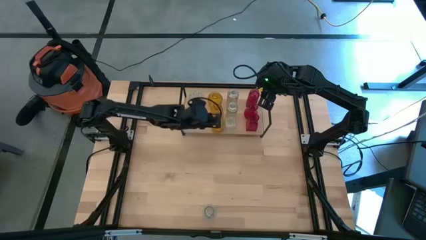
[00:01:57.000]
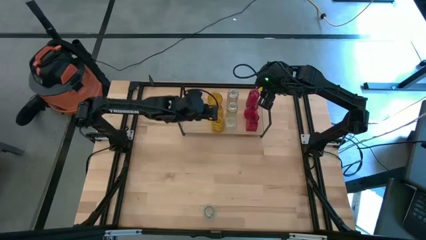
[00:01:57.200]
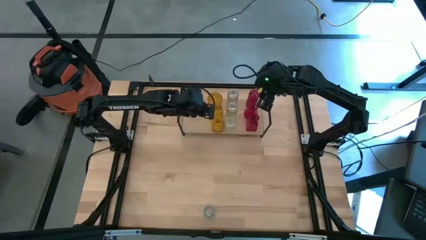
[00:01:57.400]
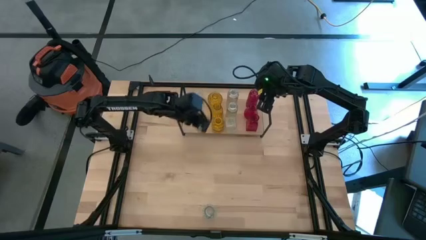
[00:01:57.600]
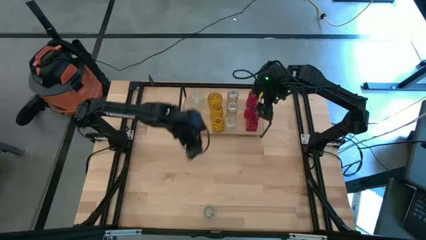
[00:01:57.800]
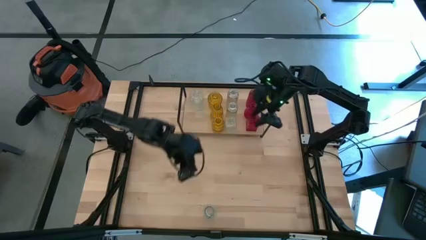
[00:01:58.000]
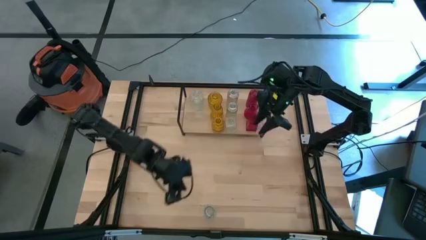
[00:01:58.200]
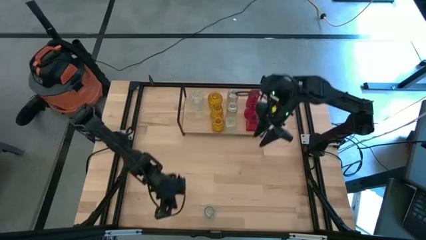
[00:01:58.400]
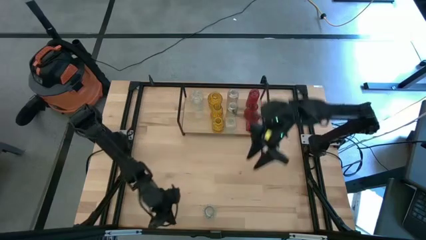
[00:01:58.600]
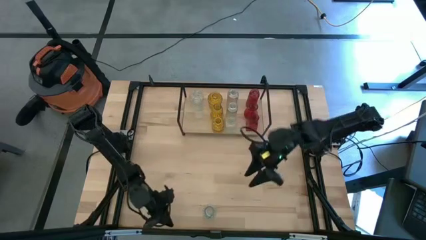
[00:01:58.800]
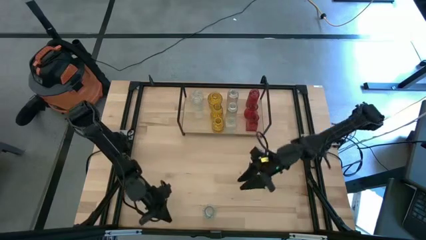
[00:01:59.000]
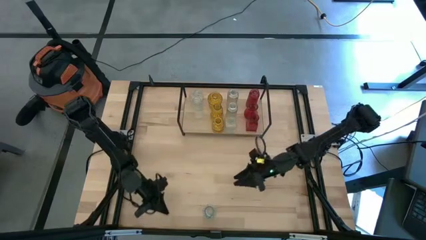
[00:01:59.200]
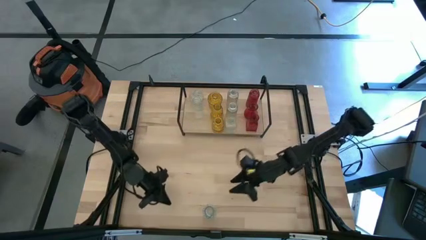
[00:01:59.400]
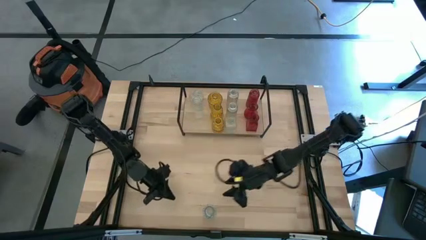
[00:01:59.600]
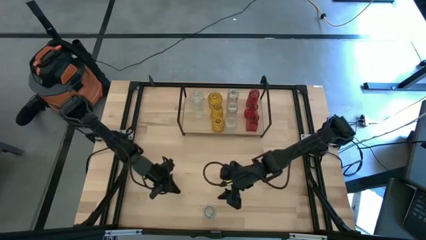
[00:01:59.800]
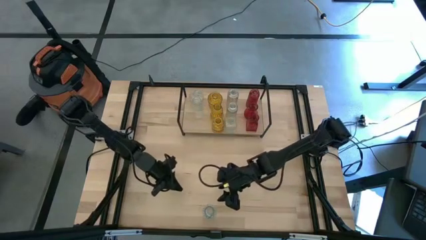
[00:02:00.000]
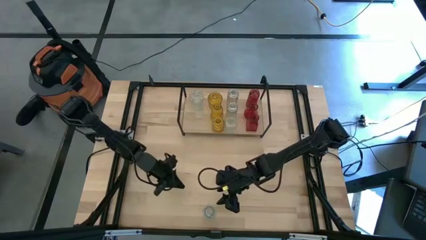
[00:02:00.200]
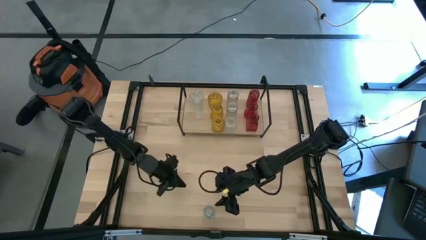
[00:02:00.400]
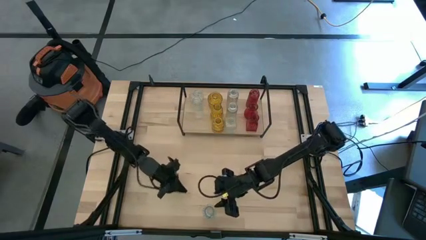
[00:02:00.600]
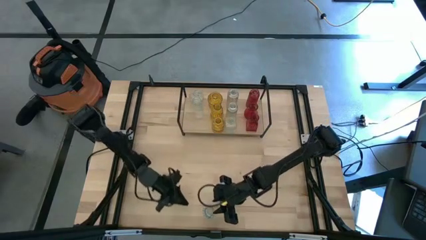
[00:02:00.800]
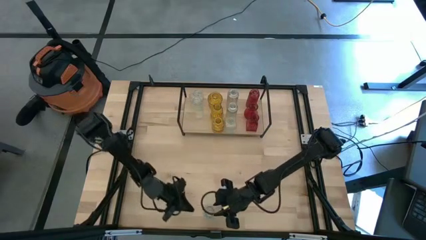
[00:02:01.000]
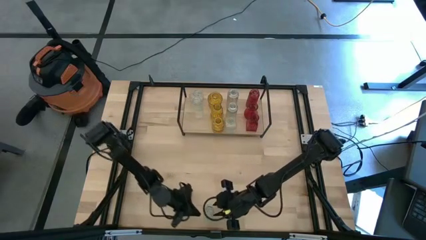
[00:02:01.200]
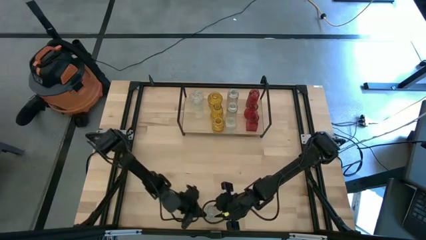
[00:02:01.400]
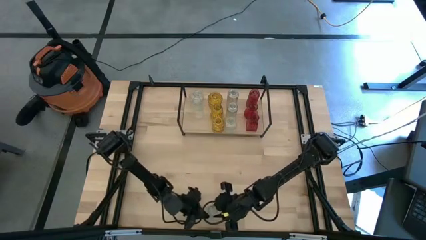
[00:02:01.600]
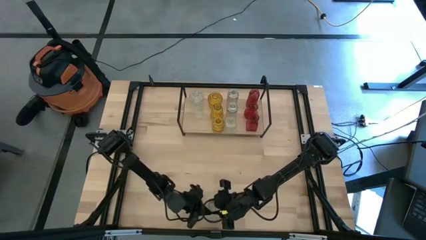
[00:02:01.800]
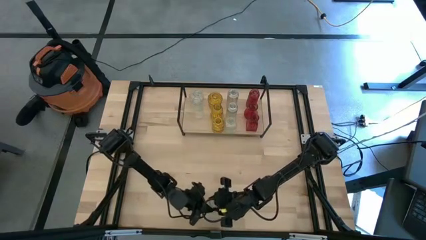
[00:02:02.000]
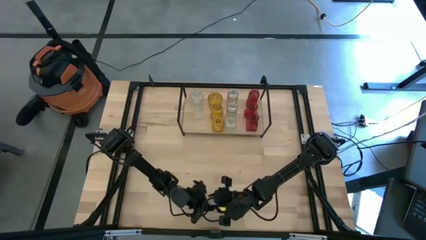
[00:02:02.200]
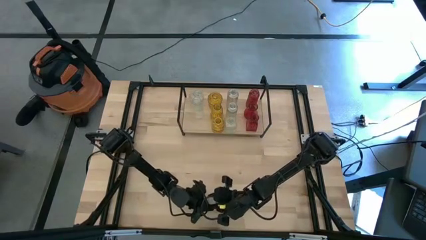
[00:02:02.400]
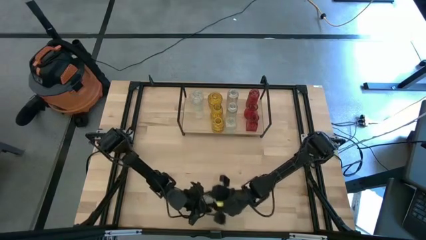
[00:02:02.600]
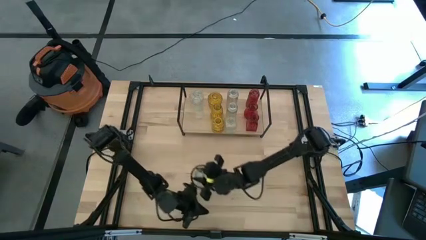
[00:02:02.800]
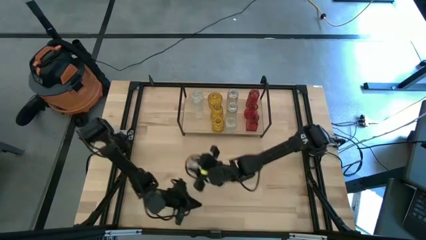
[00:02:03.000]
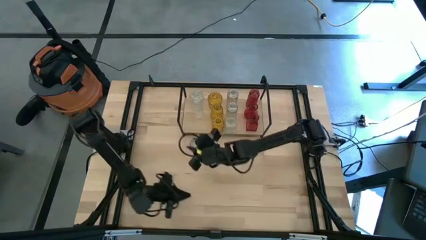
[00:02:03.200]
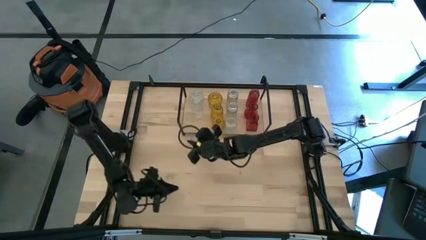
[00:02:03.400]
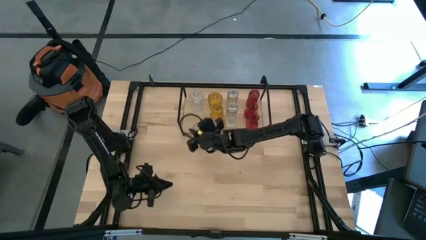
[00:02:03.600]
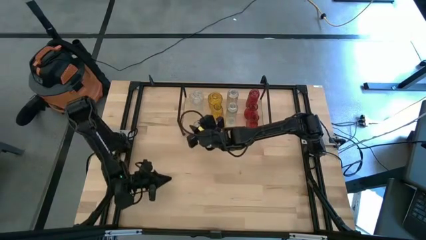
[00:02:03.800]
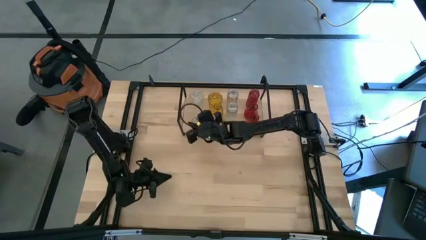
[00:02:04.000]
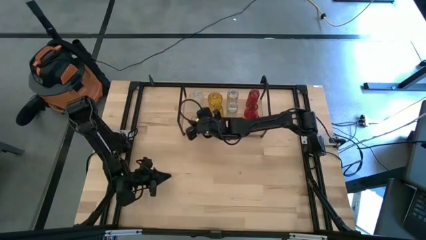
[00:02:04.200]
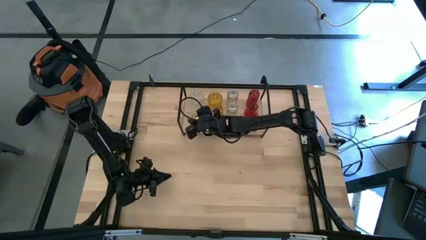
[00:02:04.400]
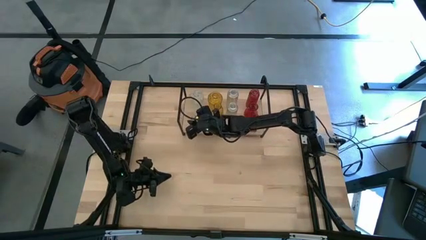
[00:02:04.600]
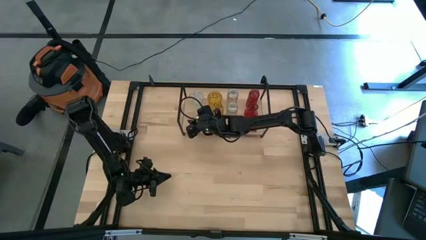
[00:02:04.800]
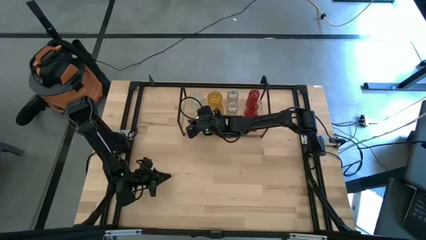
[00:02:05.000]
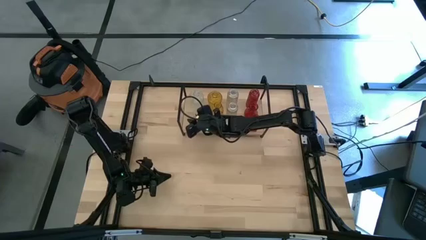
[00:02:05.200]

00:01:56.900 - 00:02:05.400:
Task: sort vases onto shelf
Put the transparent vase on the shelf aligned with the other transparent vases

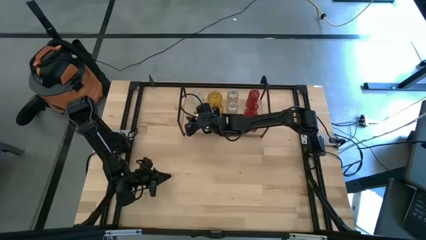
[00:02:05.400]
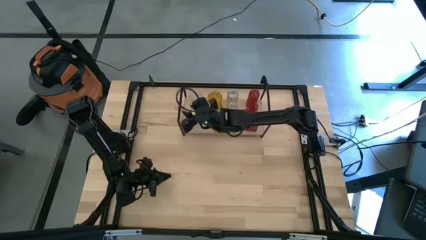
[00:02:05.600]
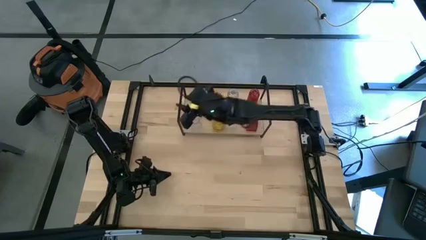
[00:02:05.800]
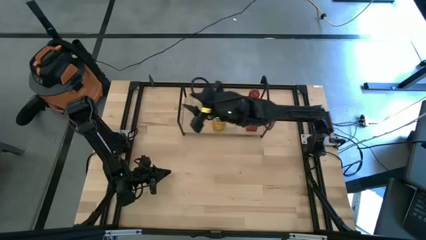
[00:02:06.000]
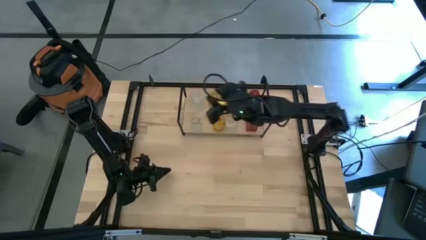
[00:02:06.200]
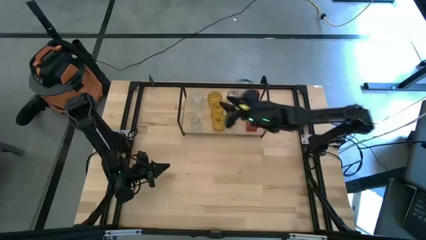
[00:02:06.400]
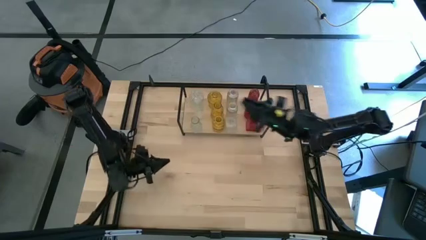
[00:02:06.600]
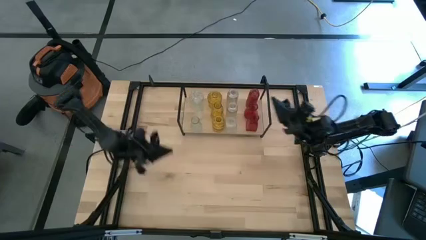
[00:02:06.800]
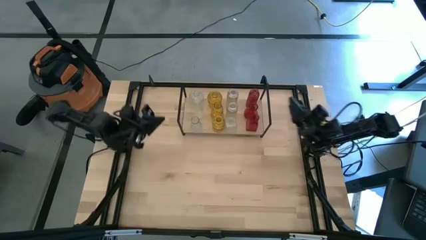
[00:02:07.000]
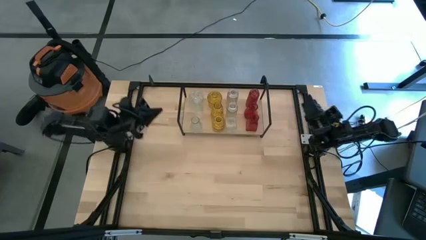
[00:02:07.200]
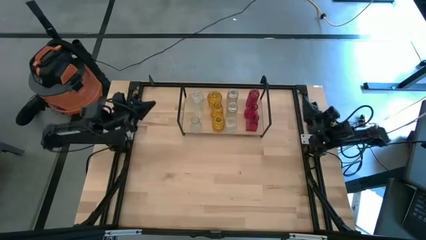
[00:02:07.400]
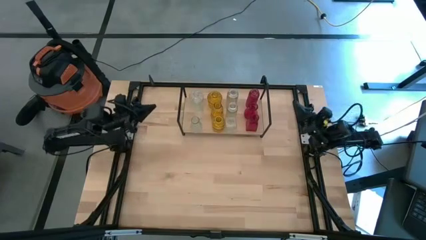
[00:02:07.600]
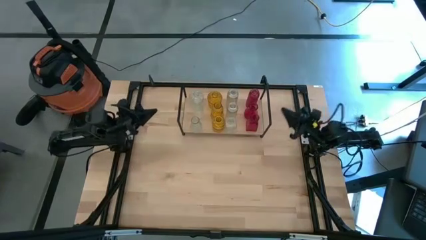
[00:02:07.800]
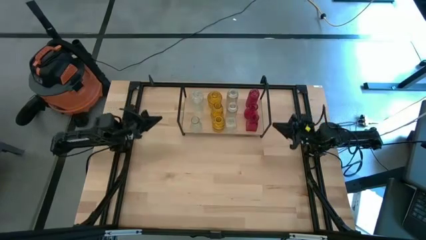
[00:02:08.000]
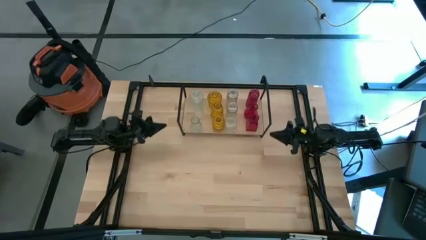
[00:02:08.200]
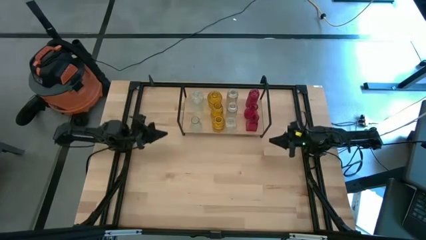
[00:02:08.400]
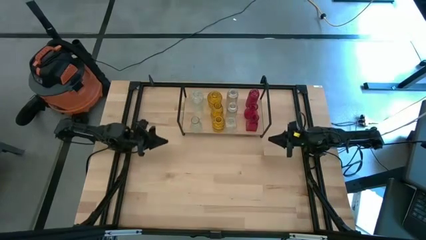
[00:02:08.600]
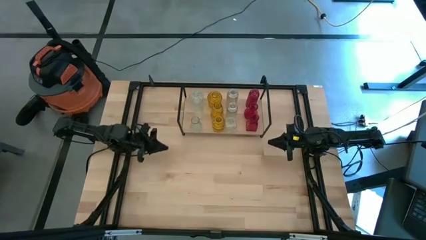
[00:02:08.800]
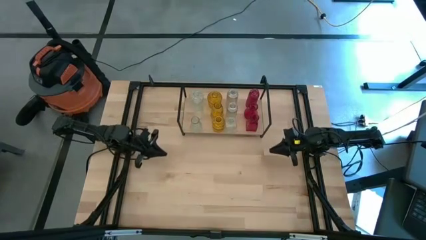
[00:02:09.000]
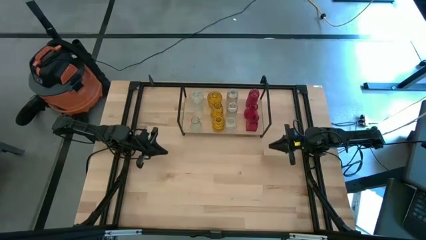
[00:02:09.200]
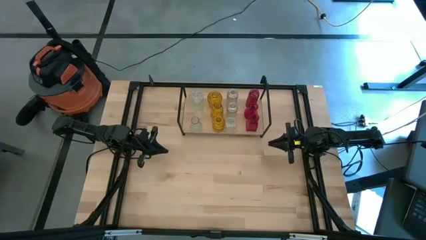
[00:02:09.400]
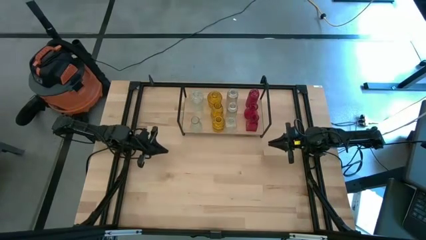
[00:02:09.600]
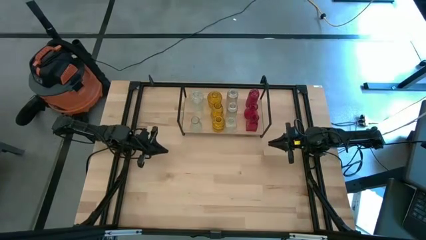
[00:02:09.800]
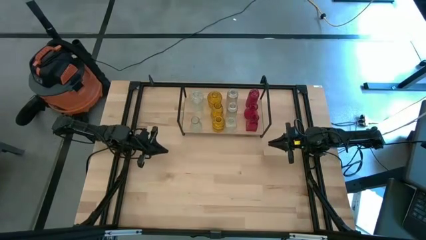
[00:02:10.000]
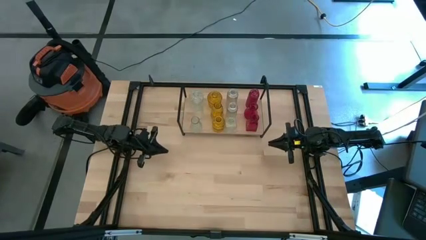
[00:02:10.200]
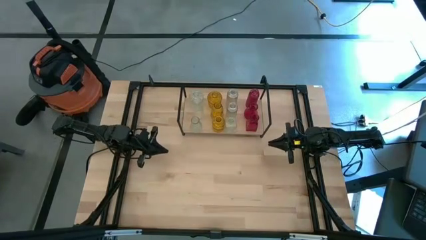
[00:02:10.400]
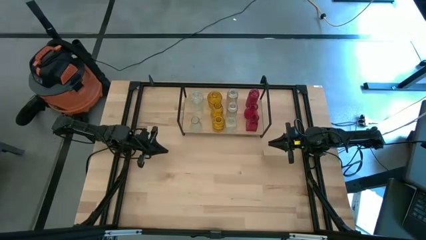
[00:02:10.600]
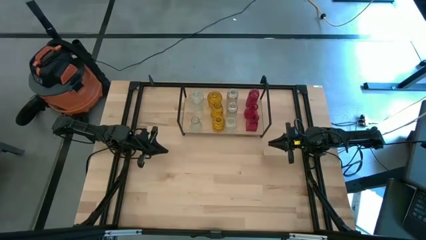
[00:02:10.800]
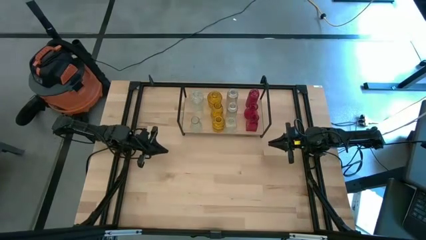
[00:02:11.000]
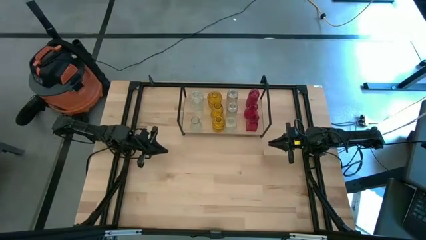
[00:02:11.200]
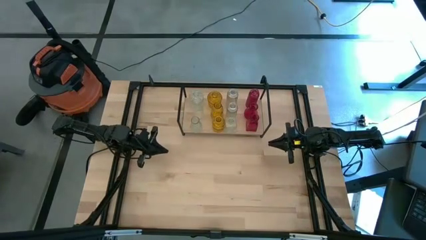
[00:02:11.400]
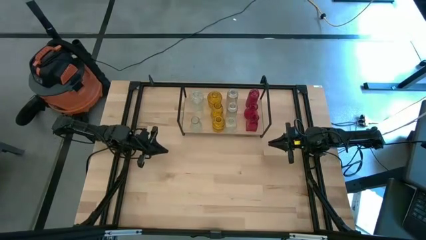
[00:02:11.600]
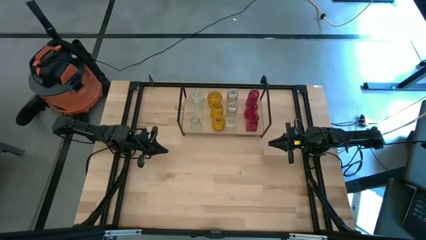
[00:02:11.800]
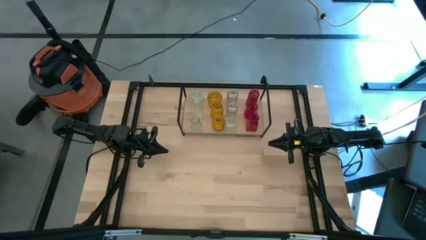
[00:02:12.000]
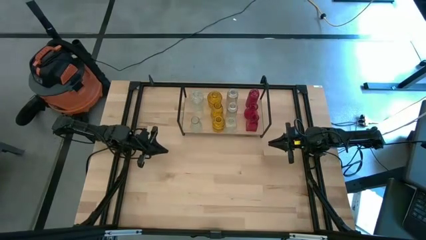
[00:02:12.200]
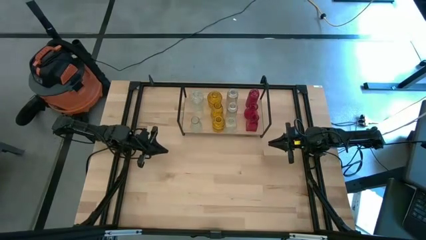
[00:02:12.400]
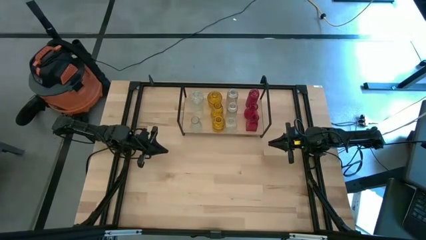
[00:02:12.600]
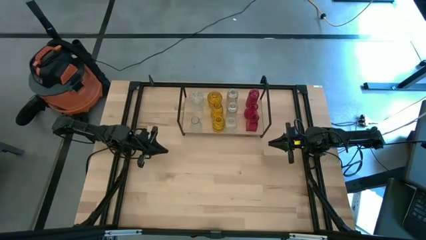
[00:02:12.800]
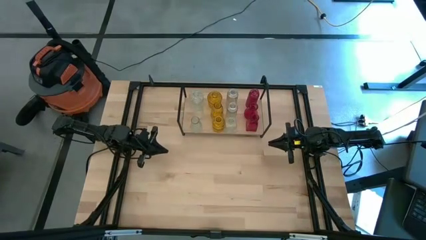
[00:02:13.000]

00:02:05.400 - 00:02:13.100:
Return to Home Position
